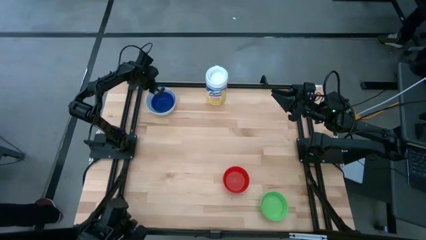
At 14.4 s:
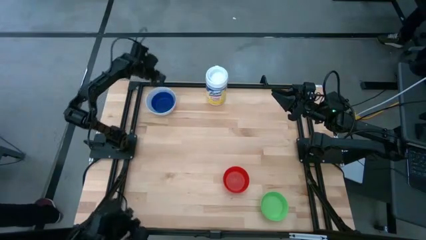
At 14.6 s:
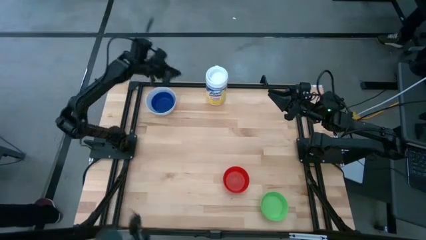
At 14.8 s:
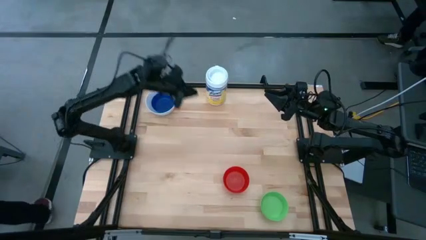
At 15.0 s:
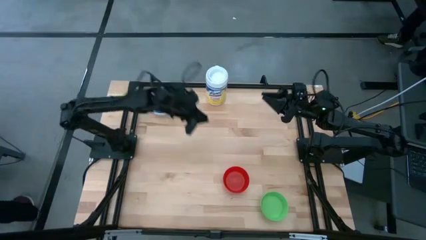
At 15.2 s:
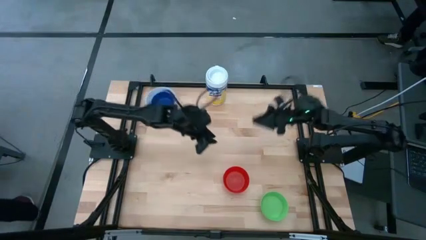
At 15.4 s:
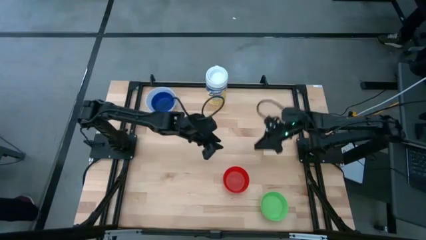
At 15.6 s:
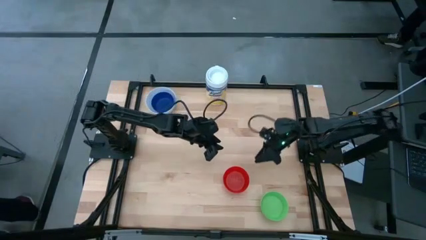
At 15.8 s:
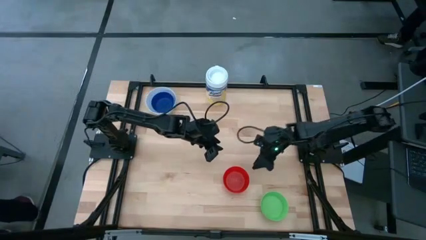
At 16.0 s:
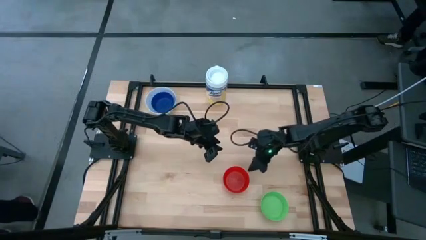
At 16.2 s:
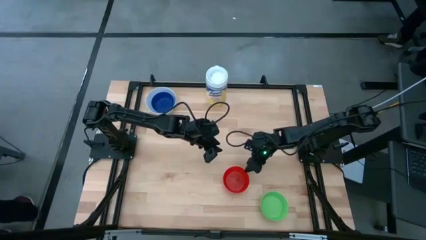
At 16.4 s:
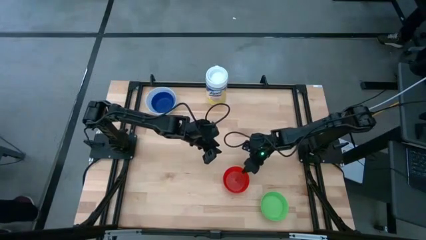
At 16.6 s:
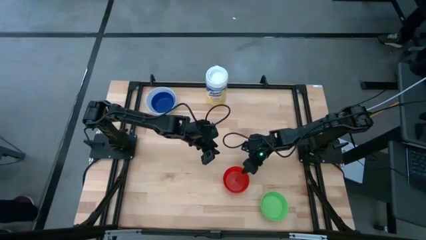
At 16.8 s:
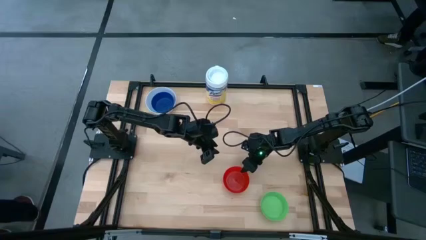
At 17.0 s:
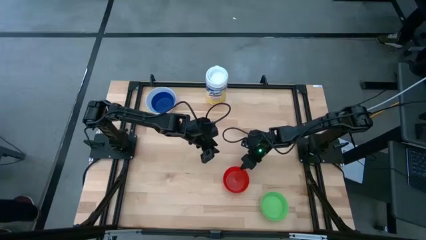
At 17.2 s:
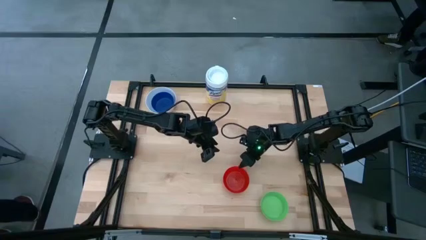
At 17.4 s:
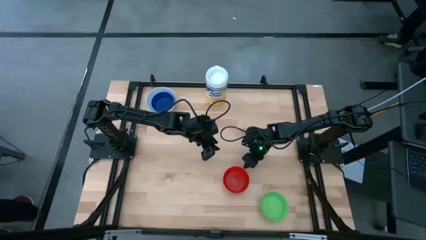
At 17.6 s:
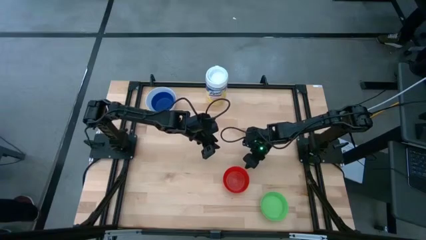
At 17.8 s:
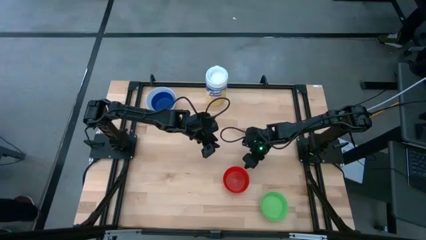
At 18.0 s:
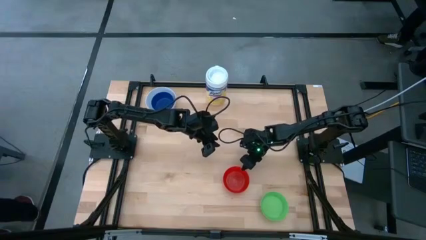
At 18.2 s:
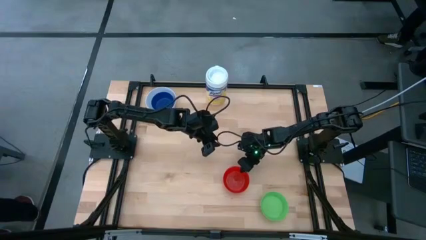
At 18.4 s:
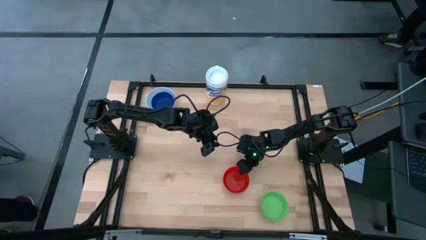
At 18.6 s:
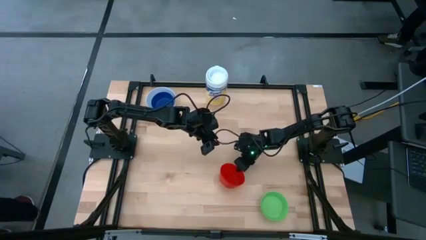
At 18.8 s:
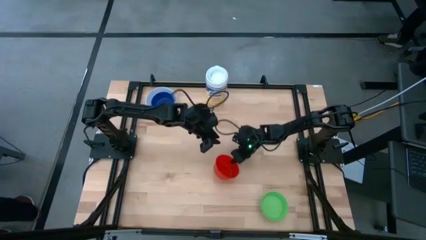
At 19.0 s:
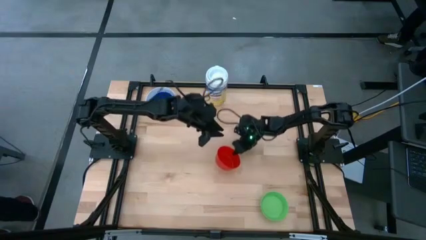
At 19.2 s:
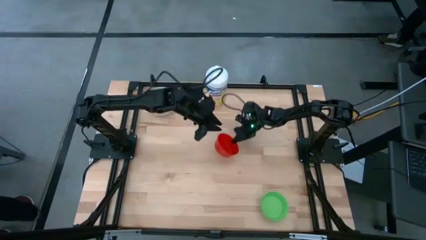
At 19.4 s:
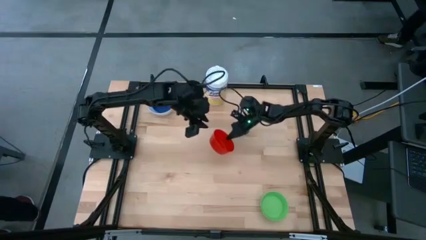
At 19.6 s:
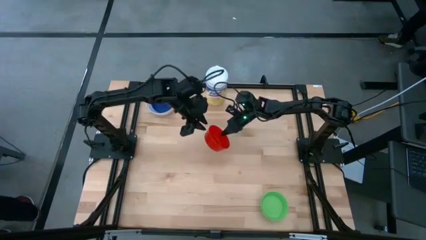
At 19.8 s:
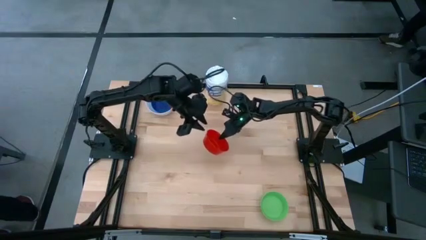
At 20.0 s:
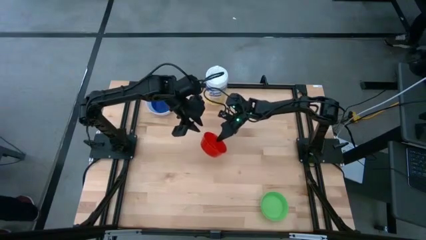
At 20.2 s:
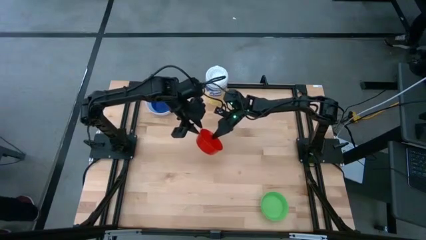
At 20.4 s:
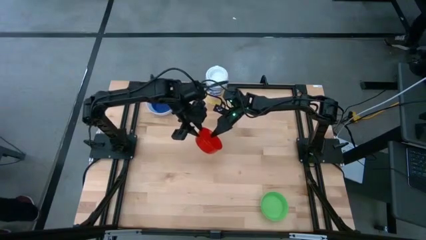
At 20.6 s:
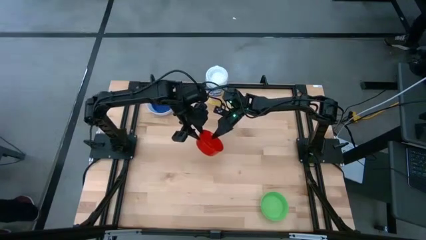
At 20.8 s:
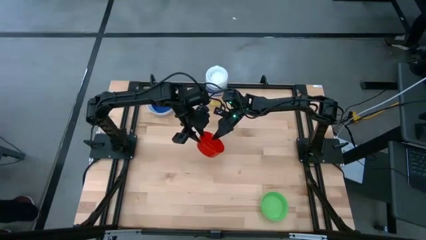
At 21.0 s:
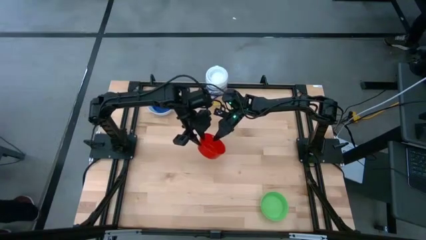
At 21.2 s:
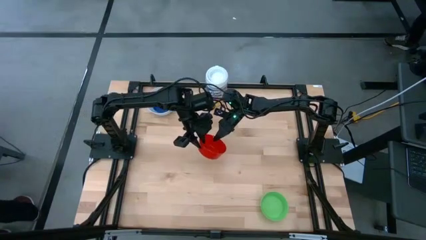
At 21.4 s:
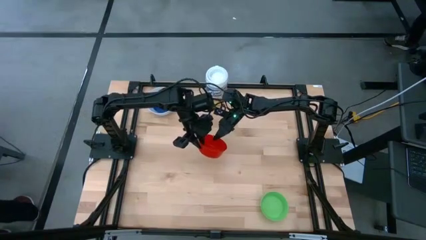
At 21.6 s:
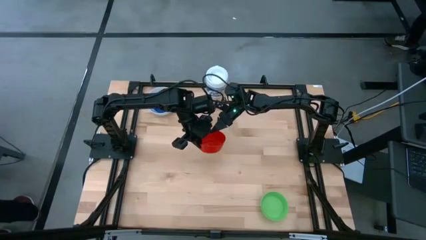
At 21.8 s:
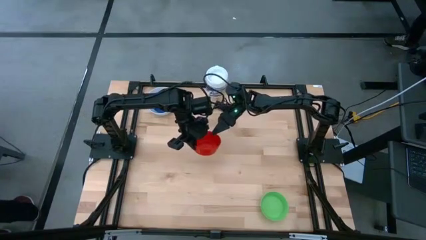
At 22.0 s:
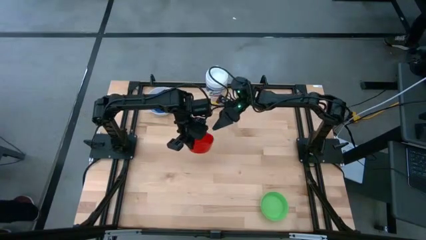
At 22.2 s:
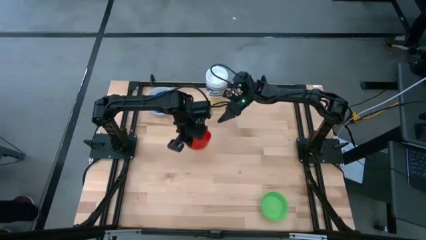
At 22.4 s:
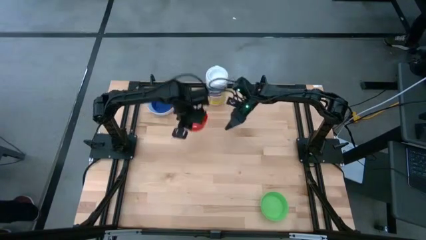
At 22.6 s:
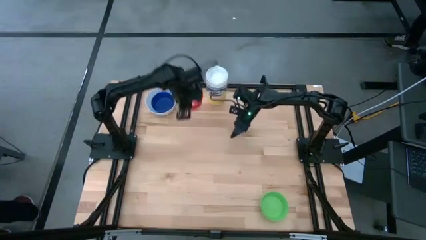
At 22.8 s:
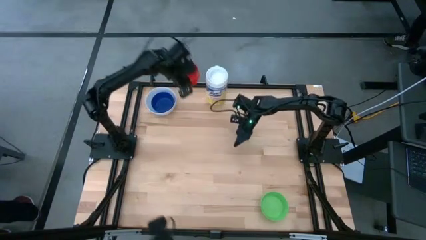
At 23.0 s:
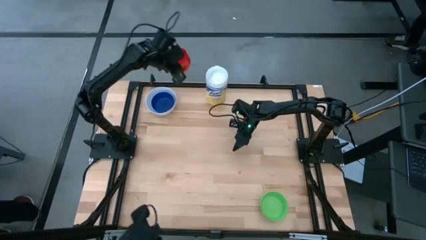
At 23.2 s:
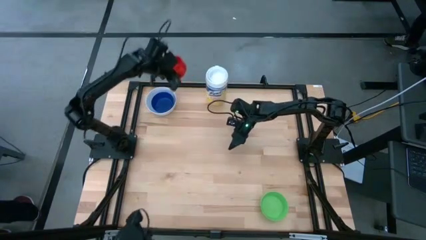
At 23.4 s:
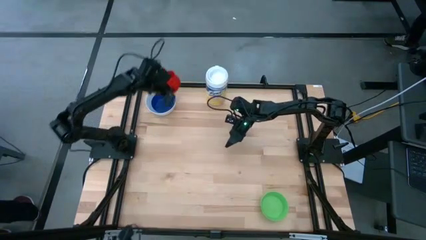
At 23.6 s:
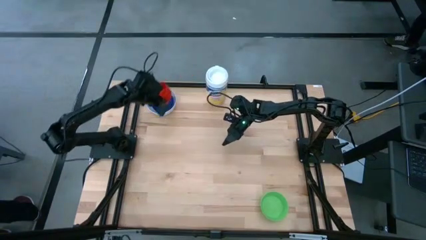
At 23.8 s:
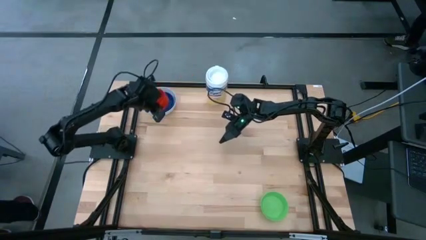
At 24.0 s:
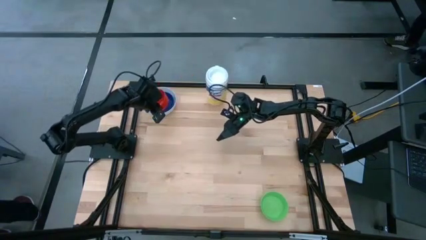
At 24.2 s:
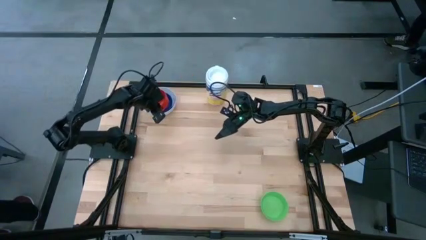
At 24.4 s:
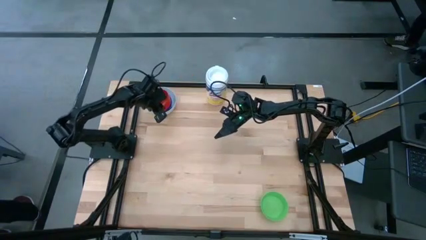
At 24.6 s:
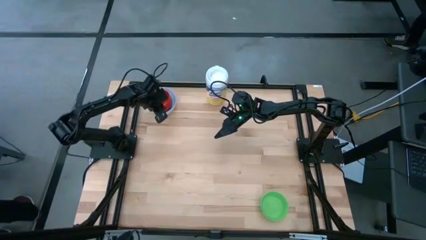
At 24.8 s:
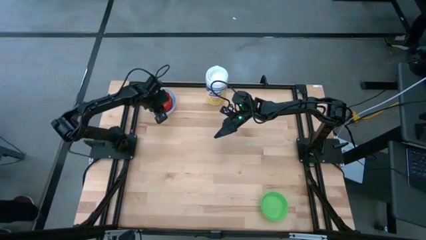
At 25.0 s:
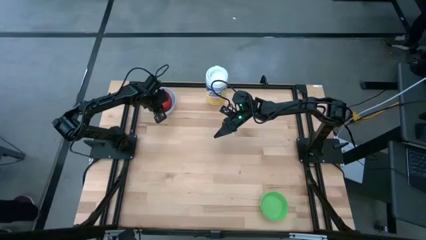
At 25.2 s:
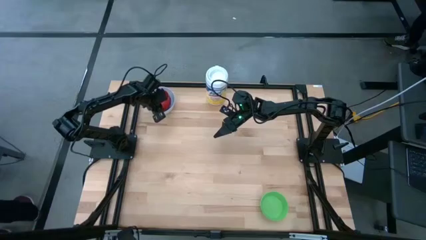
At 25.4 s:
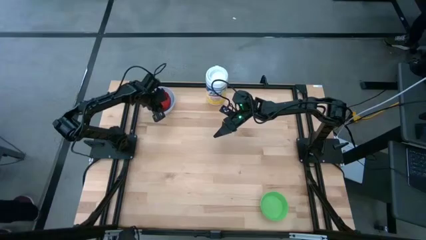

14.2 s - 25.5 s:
Stack the red bowl on top of the dark blue bowl
